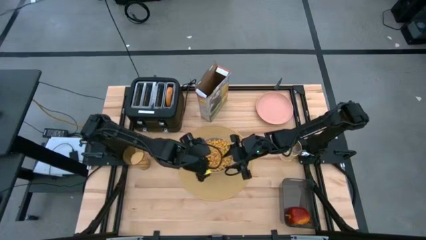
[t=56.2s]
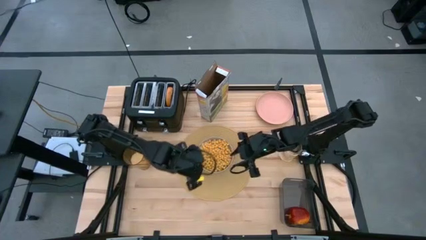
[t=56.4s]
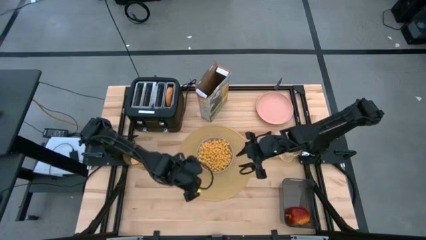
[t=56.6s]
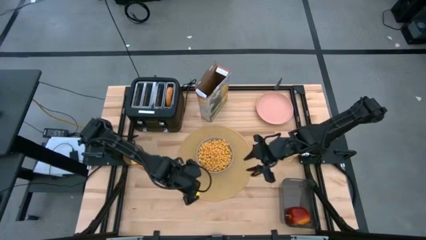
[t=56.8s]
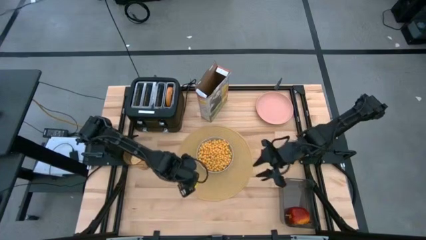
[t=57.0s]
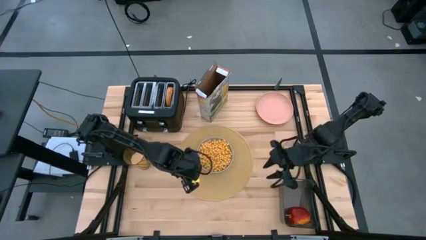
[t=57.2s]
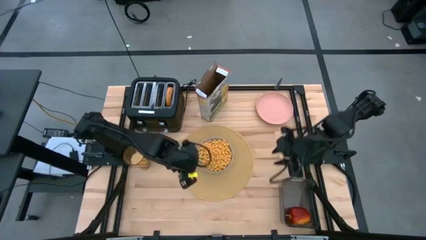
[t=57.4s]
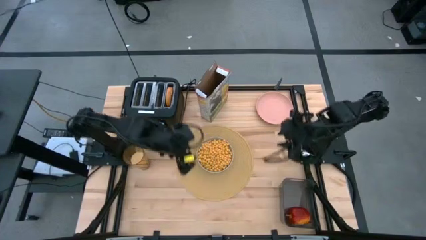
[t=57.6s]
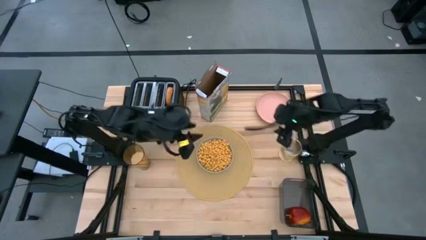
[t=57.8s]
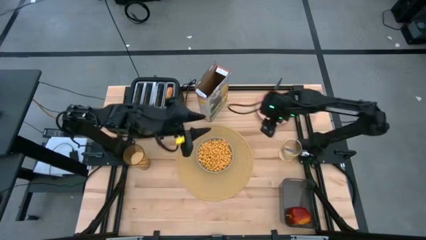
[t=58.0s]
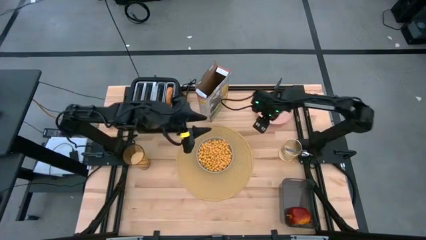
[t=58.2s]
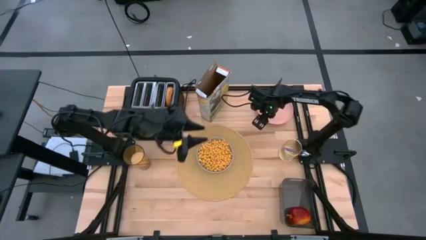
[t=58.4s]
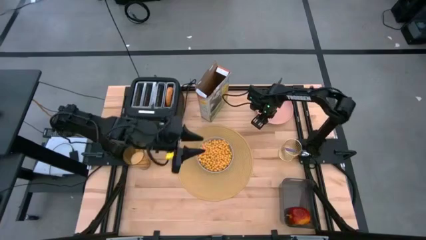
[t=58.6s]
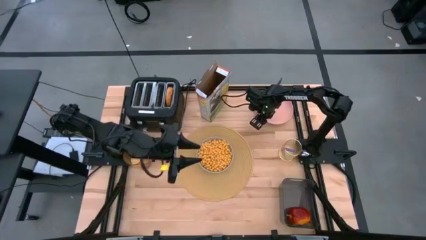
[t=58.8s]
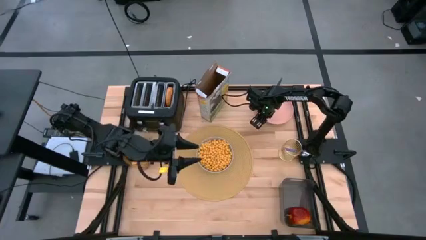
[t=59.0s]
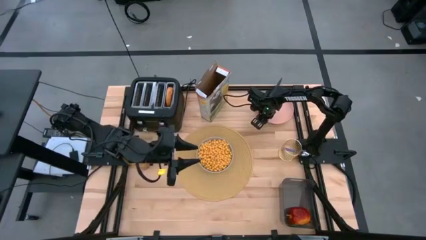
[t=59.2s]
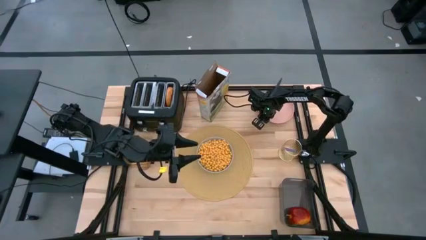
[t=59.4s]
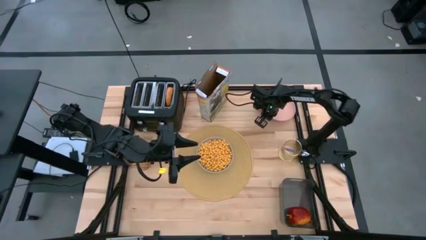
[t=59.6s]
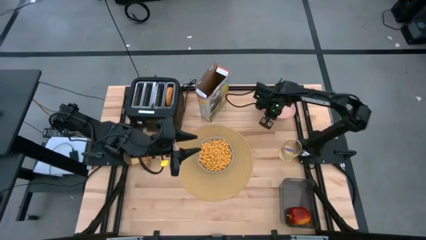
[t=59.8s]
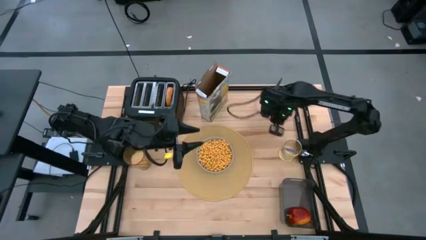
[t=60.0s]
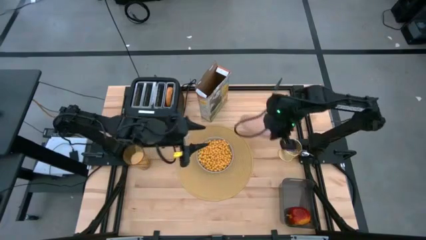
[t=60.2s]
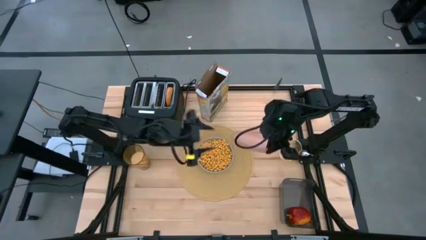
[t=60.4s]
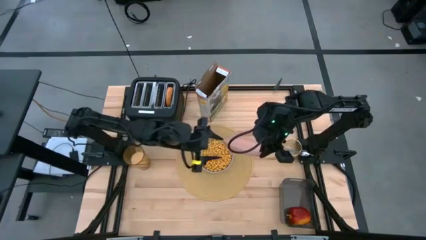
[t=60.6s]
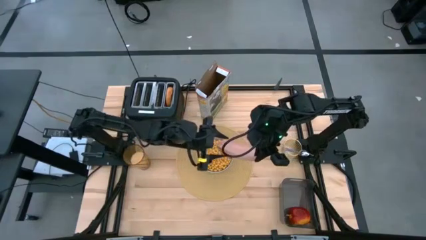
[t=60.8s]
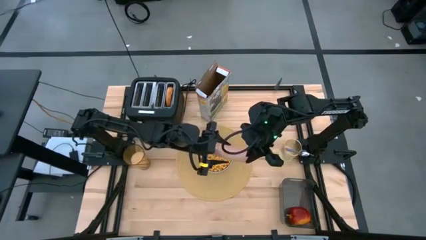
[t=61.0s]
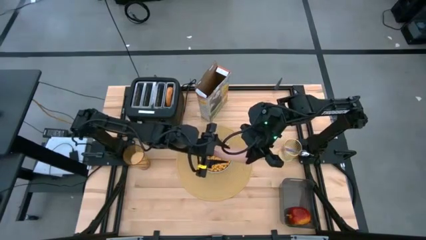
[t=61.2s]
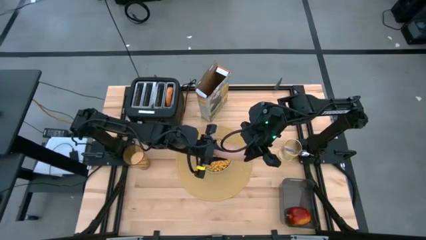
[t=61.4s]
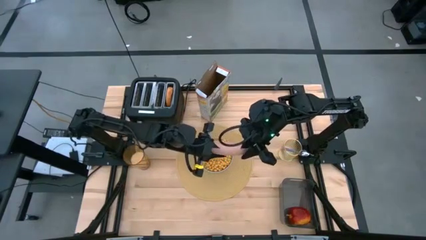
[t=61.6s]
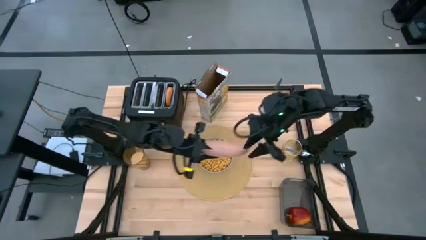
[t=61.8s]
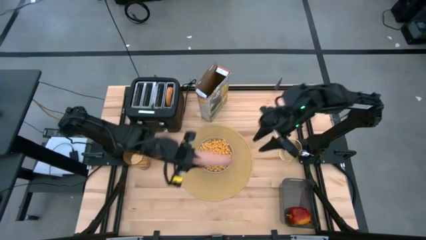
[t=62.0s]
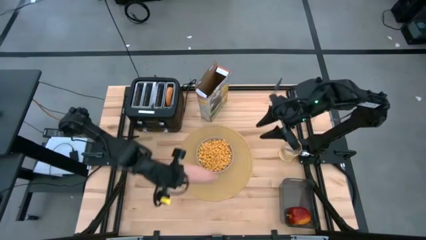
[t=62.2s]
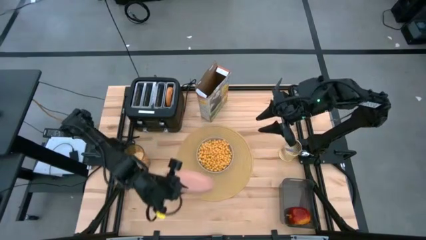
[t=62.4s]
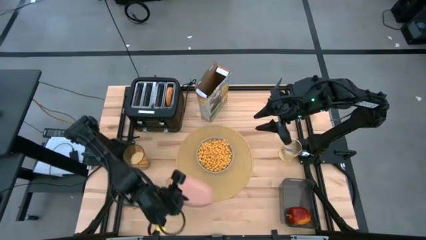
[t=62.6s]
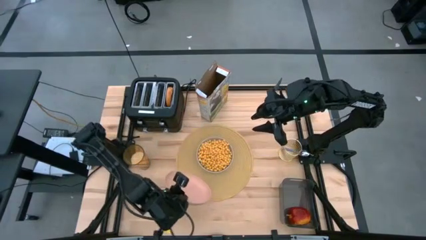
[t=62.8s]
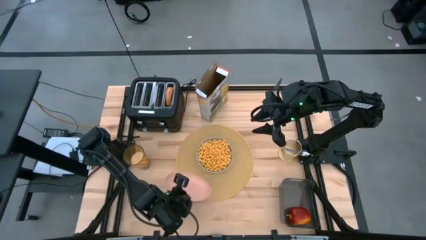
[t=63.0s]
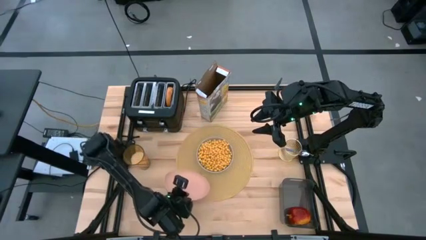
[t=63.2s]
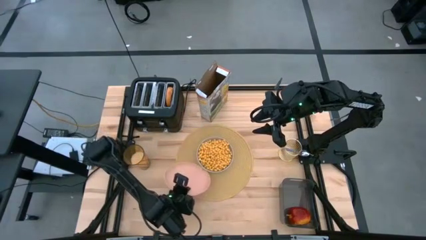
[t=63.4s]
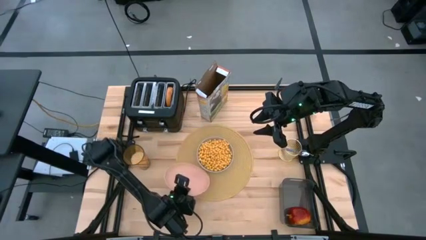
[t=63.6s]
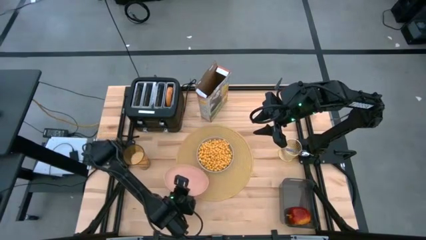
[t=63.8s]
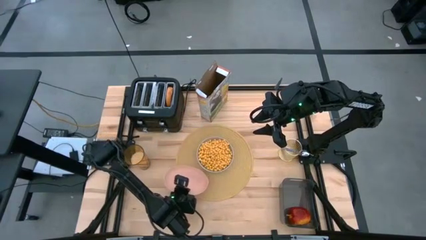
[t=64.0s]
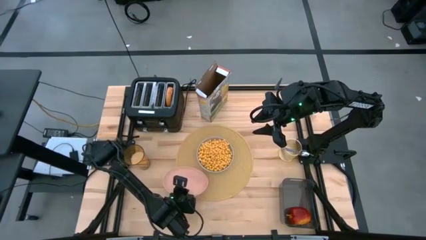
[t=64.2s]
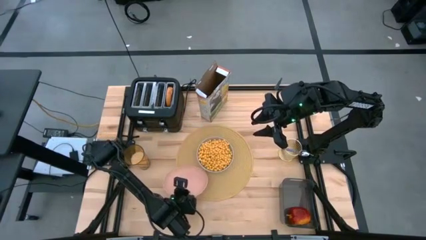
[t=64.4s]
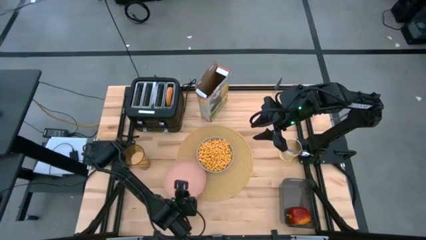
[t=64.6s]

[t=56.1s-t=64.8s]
Task: Arrange a breakfast setting
Put the pink plate on the brown placemat to the bottom left of the gray bowl

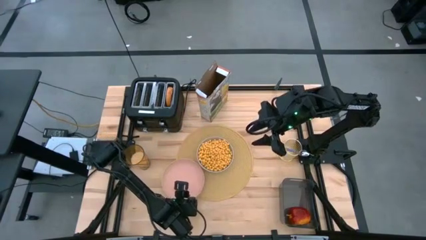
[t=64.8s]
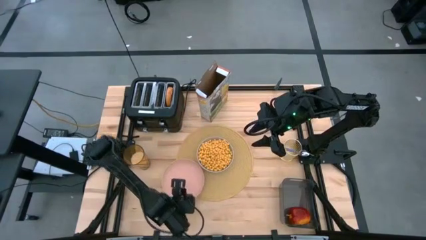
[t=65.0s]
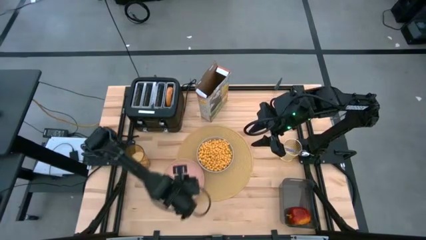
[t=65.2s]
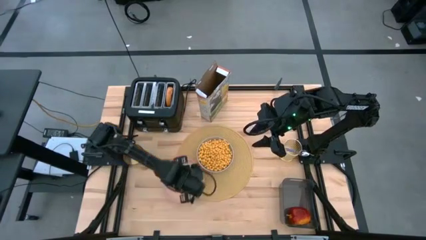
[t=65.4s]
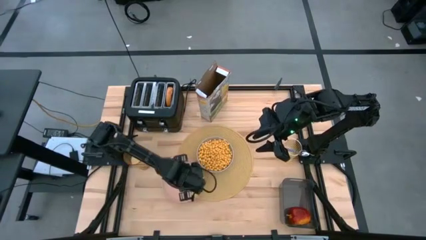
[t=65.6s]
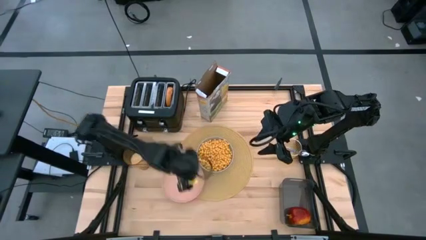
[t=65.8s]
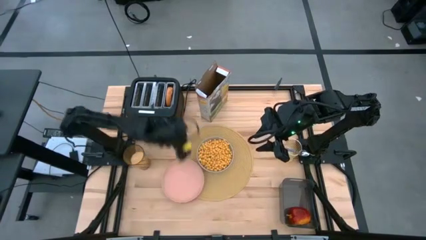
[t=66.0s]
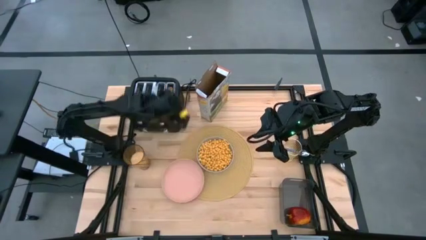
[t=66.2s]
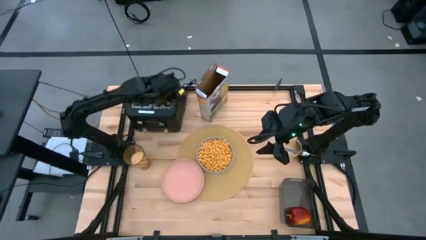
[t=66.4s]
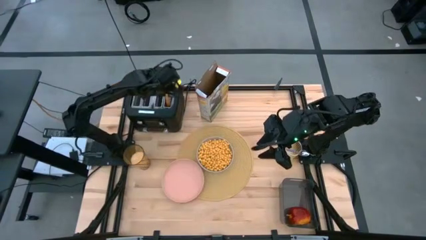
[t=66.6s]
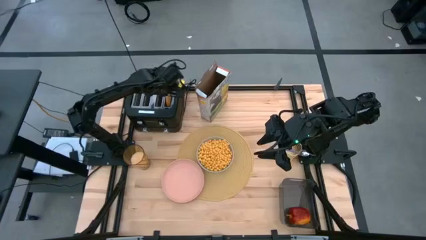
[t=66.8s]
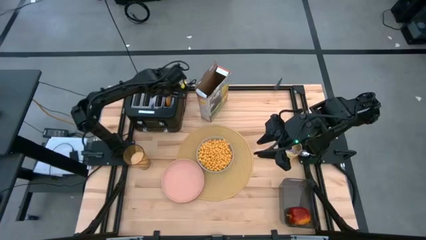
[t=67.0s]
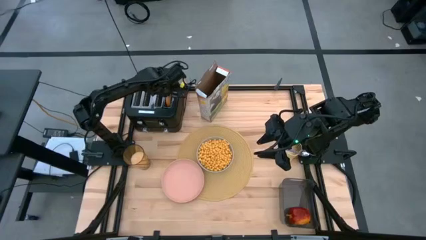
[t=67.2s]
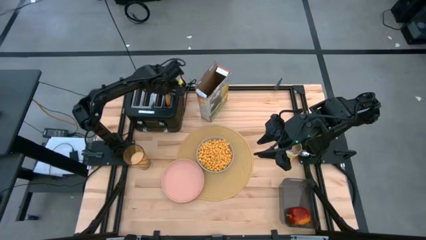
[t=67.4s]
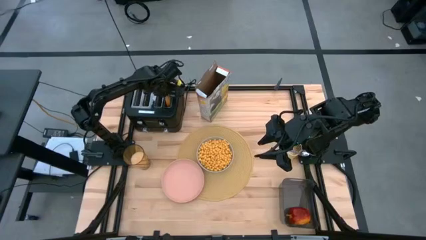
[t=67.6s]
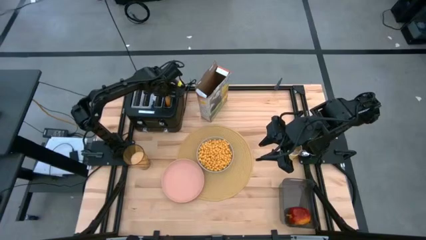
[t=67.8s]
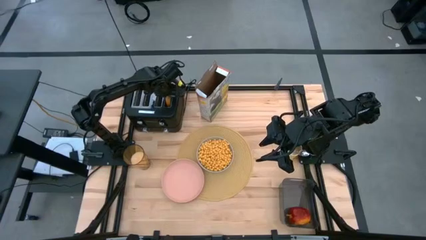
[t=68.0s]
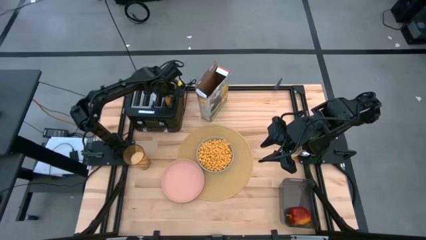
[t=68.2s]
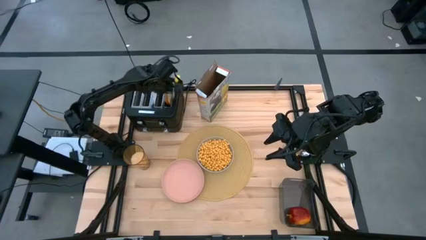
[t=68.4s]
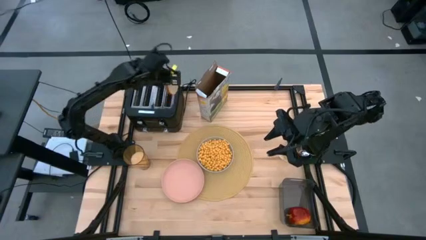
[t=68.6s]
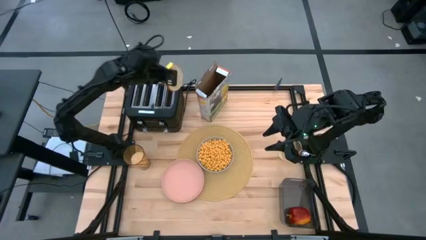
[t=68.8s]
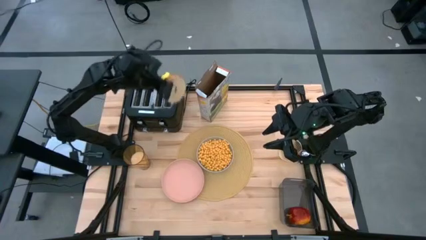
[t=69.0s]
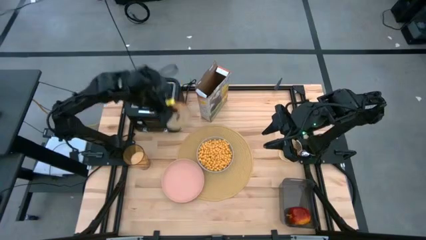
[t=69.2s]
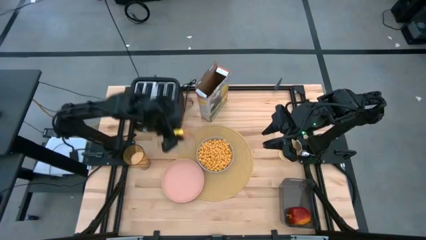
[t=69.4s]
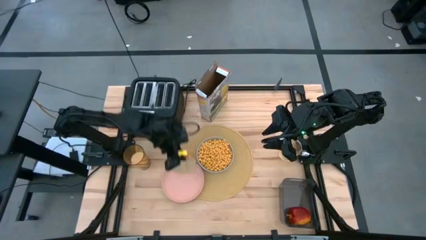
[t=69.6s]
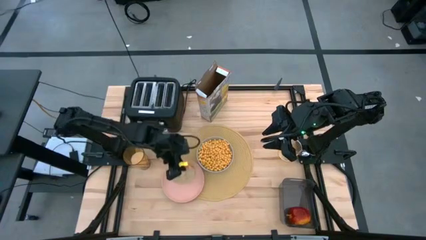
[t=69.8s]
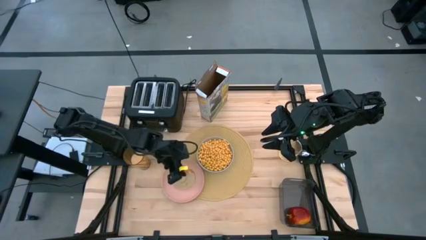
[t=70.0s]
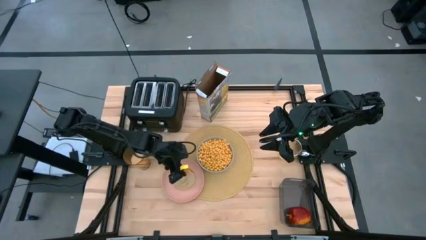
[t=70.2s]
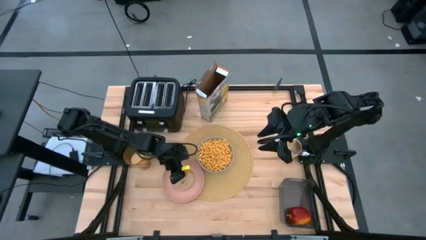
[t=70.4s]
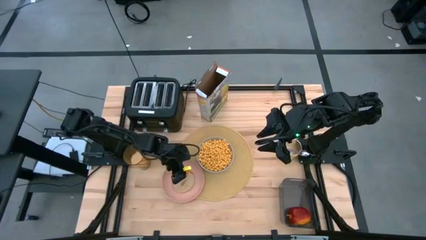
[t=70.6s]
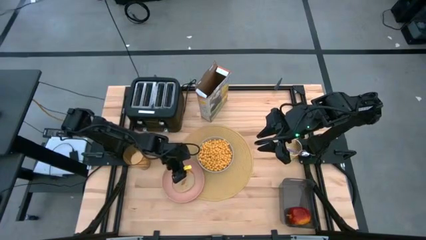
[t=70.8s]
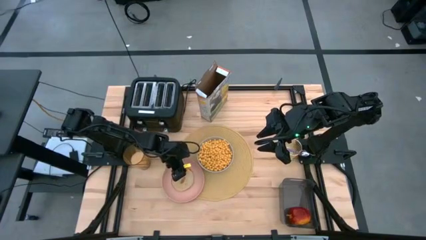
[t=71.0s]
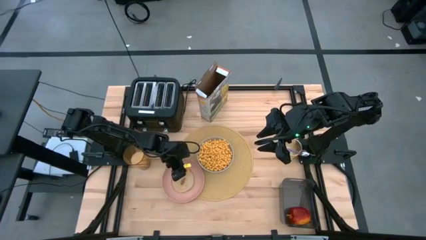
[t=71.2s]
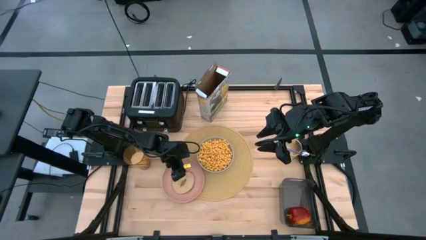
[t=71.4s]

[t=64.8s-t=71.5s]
Put the bagel from the toaster on the pink plate
